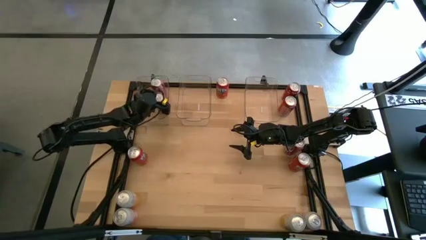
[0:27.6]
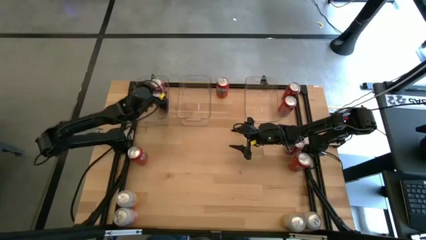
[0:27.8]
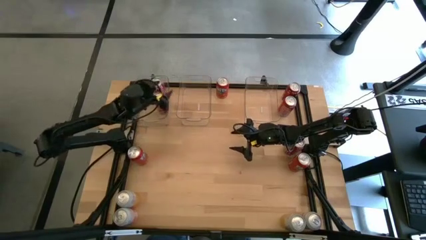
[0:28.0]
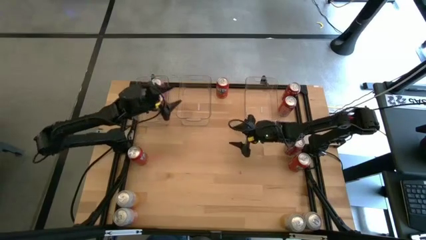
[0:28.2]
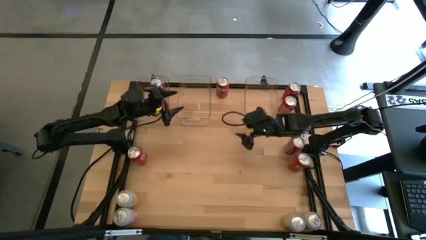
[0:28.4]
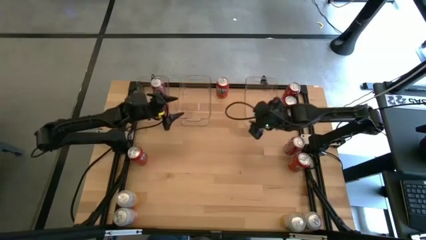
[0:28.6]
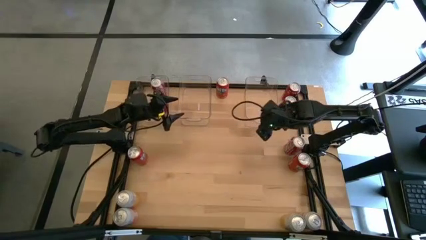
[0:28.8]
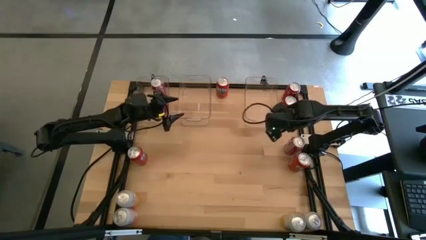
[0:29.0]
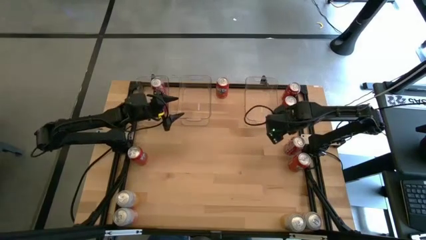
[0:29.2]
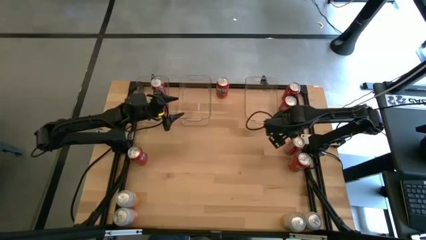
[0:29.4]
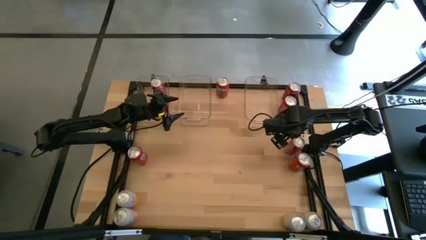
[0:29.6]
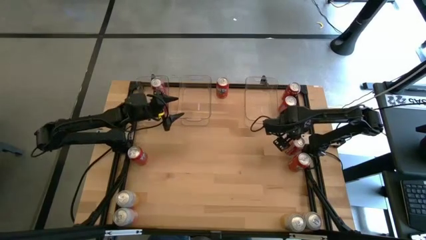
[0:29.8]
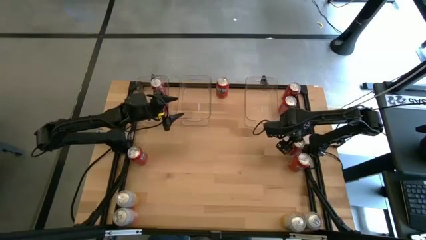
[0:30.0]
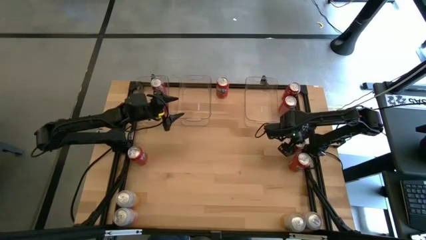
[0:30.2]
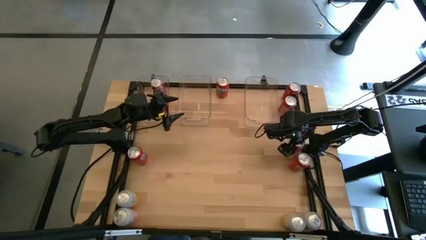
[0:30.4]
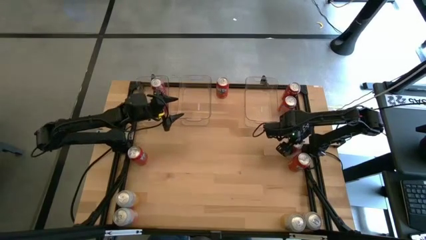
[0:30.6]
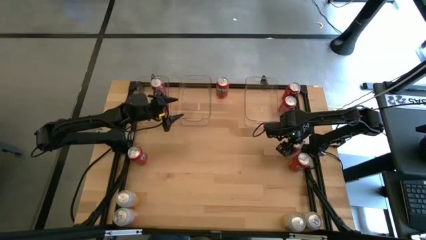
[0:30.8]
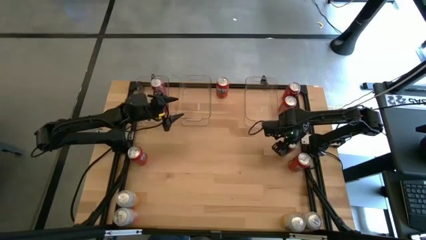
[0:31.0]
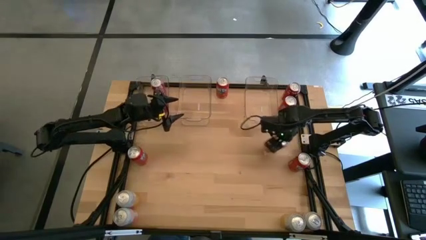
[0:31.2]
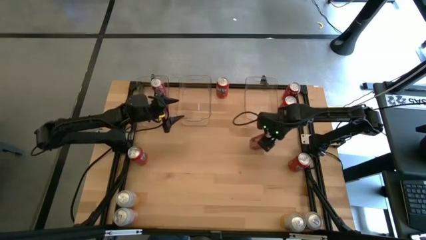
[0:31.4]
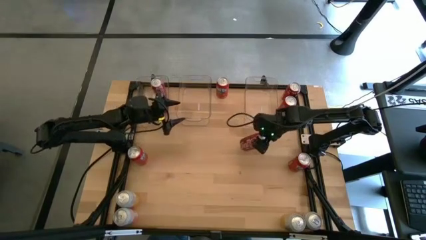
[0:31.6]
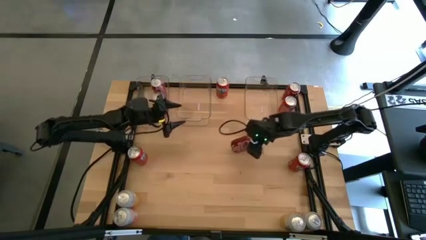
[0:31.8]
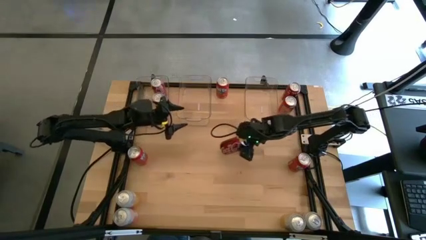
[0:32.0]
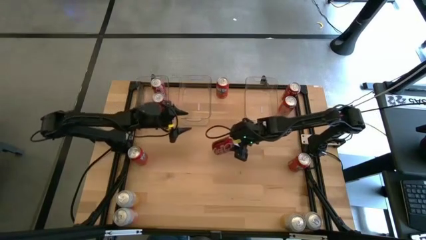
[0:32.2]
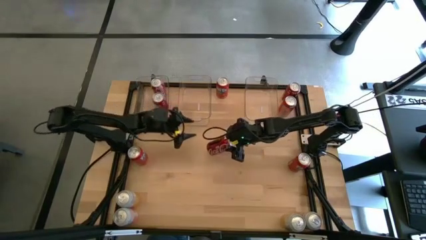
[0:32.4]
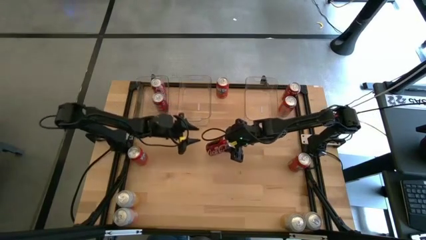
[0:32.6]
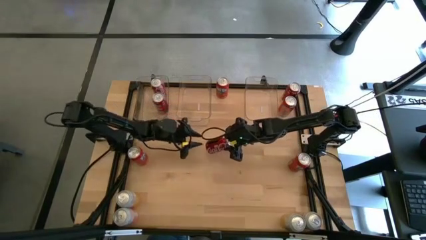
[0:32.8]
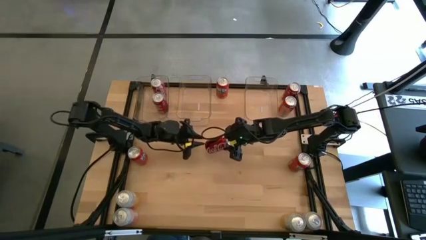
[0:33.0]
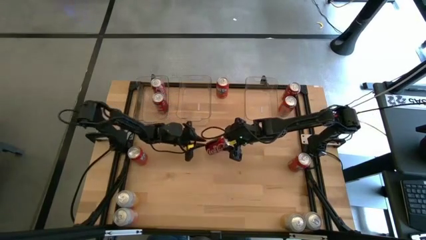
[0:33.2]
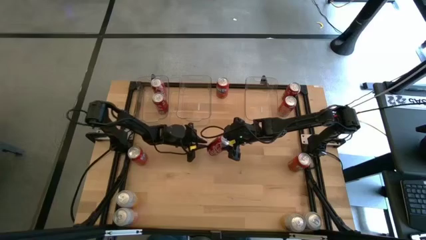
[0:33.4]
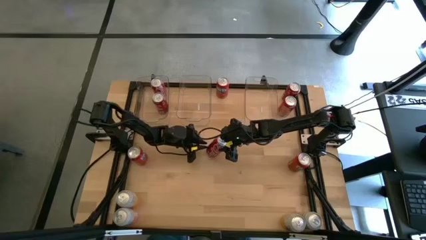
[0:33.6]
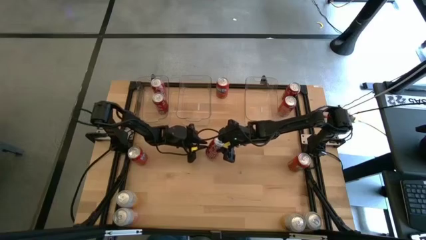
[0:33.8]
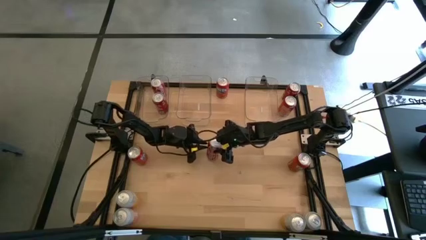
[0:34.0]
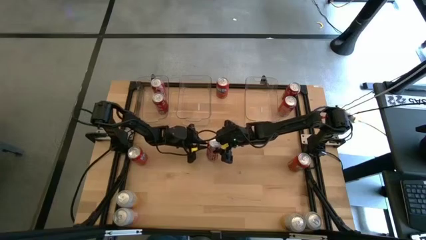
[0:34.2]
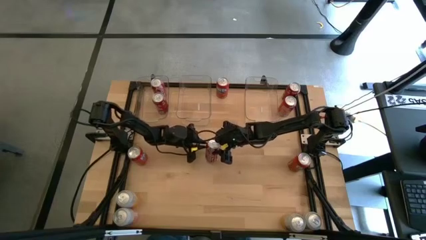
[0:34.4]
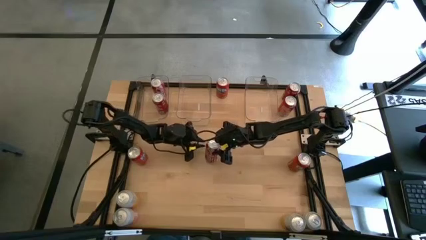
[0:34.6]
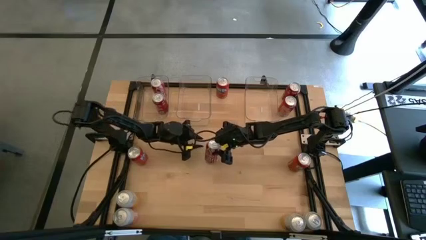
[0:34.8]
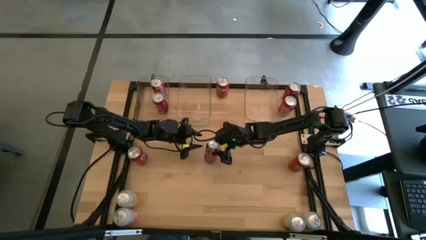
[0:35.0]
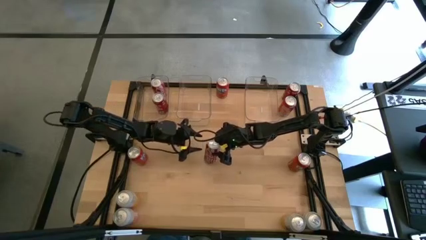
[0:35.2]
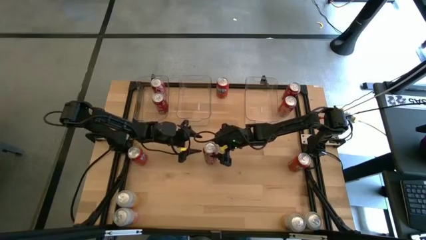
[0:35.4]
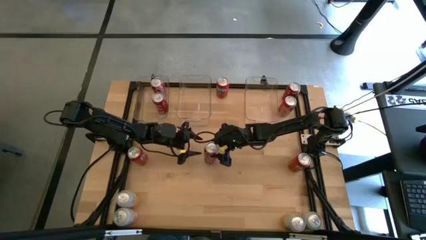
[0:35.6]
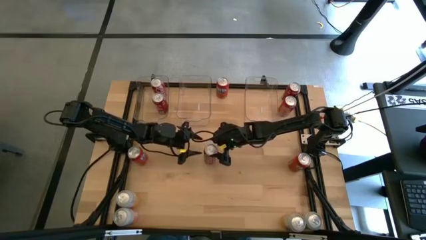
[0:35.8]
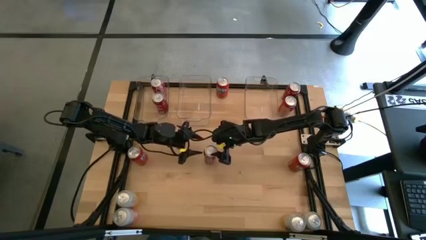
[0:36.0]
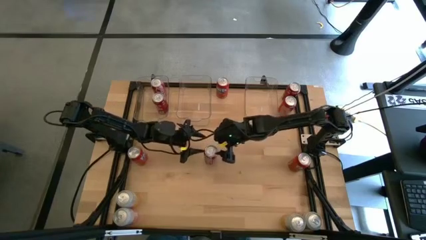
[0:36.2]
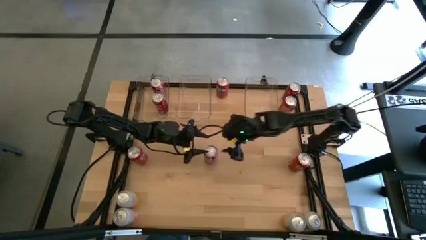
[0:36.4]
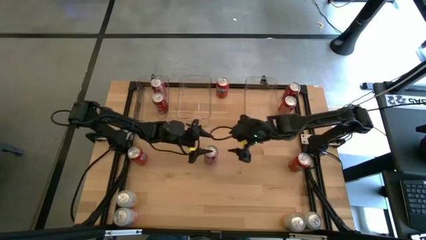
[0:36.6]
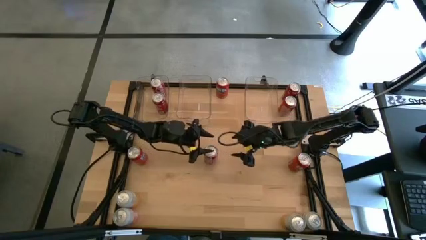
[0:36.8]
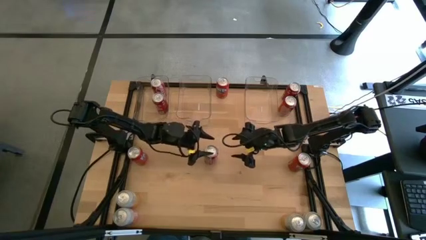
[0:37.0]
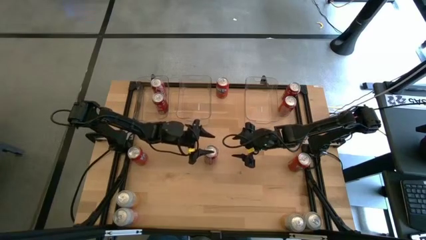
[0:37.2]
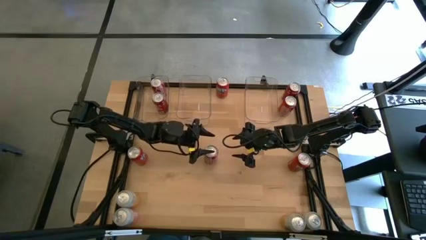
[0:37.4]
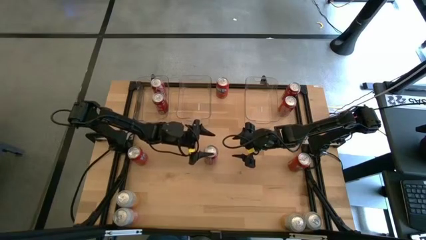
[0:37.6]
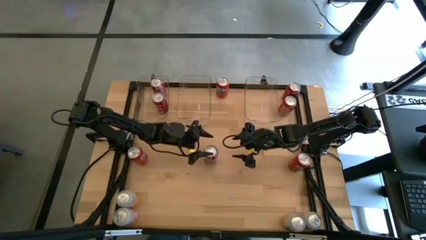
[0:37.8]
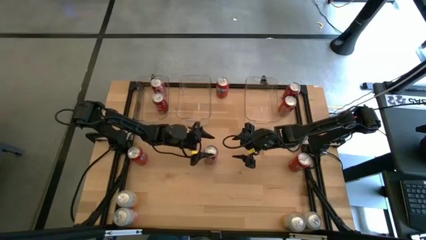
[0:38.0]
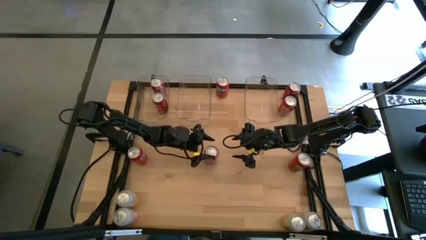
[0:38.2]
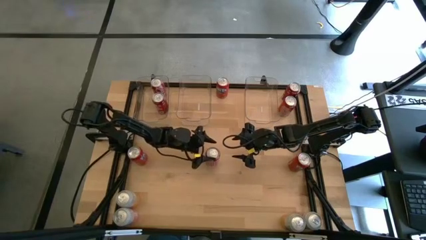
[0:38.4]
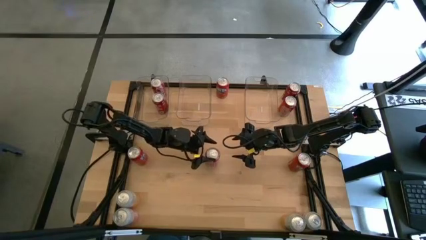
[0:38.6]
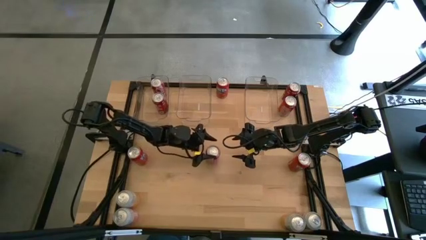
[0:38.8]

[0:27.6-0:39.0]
Task: Sort soda cans
Put the red soda can into the left transparent bin

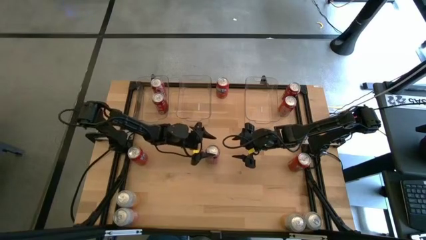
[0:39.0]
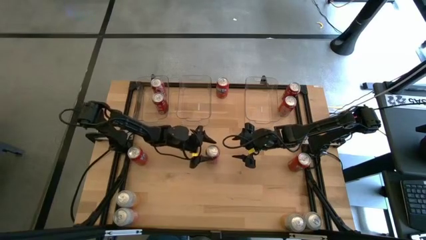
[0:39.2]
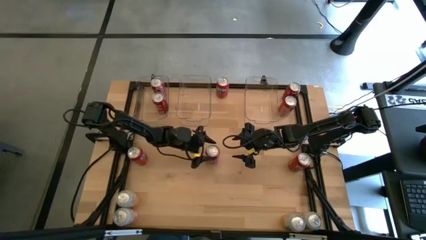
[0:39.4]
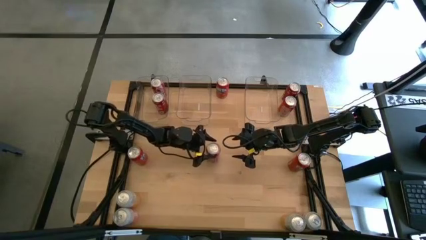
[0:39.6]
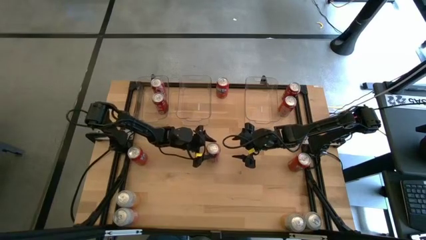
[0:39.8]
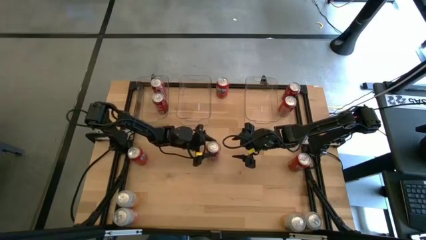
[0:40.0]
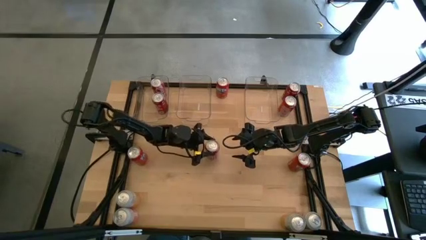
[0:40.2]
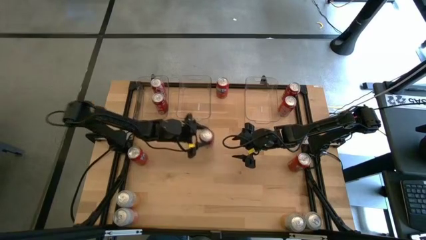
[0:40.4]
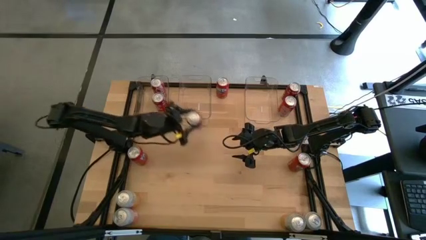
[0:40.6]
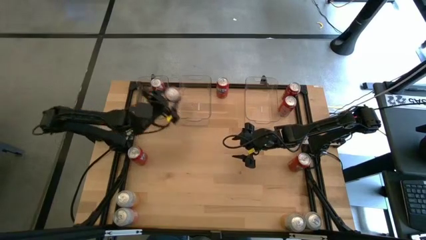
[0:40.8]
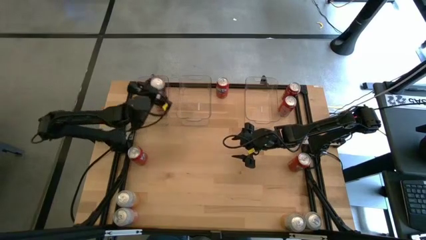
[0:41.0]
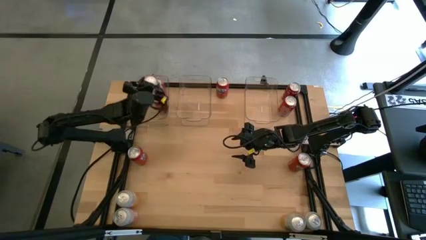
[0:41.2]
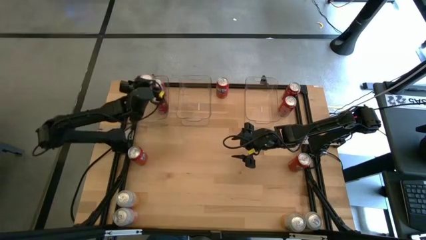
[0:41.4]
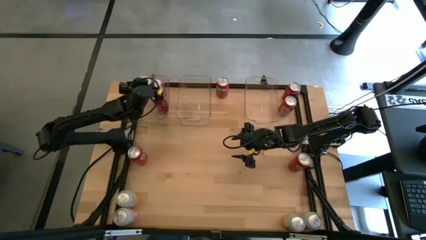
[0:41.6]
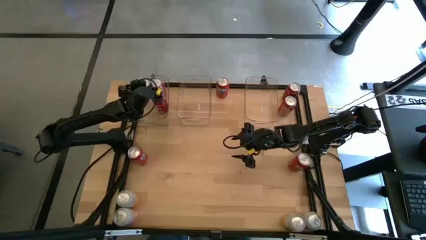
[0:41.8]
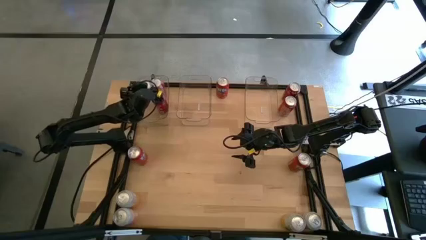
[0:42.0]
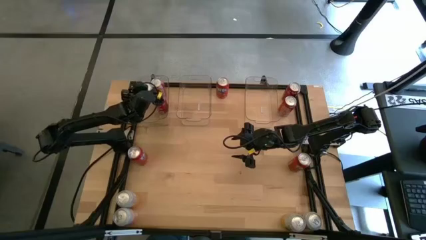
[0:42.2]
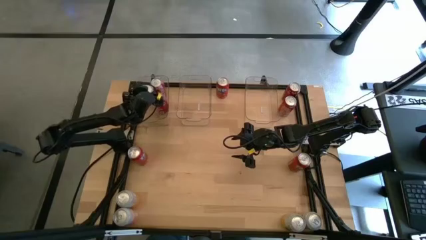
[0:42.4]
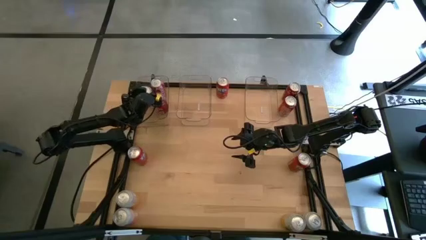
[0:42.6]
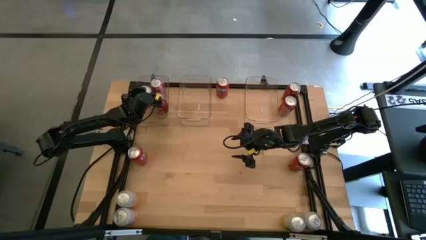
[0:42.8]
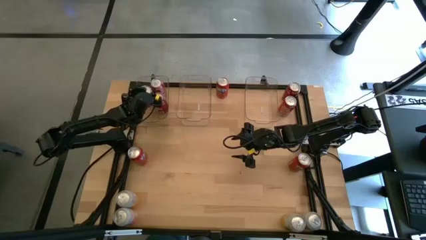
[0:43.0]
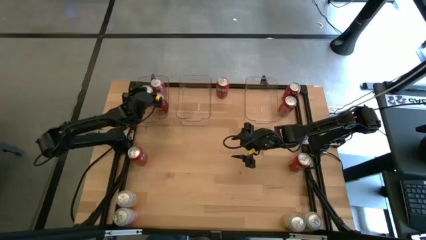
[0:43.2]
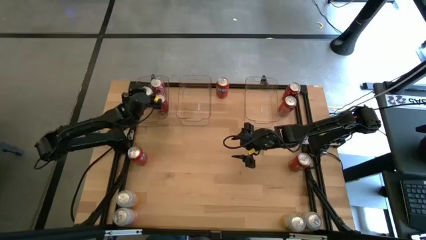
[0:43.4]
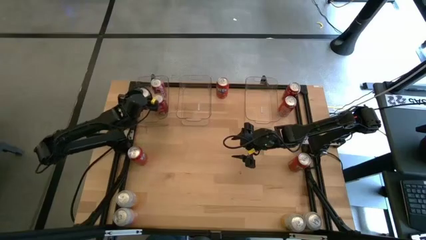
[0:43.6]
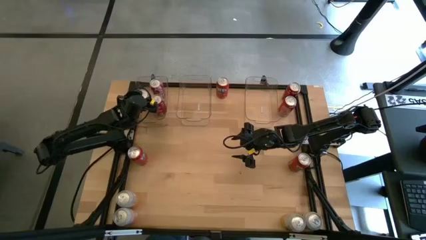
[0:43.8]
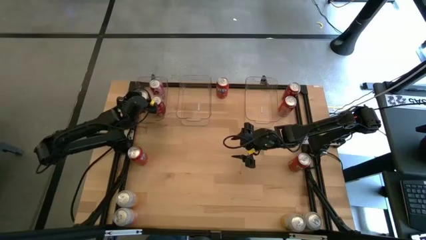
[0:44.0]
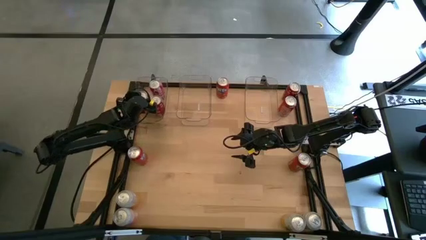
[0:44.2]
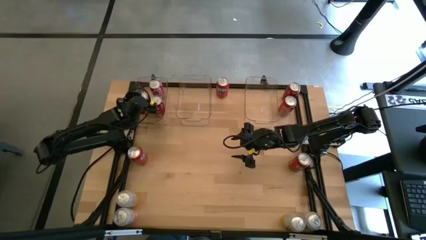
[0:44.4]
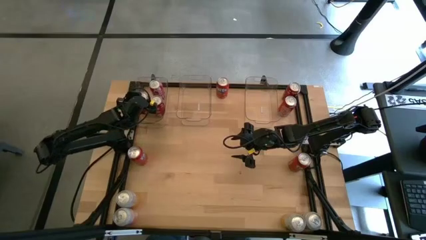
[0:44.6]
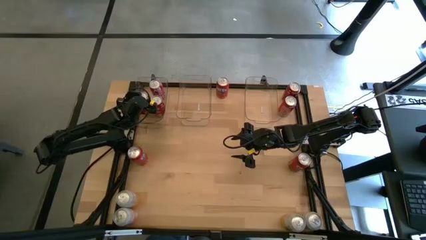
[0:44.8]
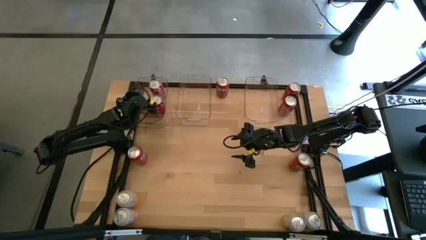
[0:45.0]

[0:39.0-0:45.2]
Put the red soda can into the left transparent bin
